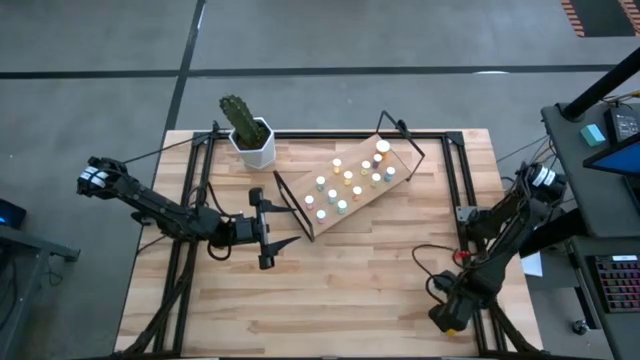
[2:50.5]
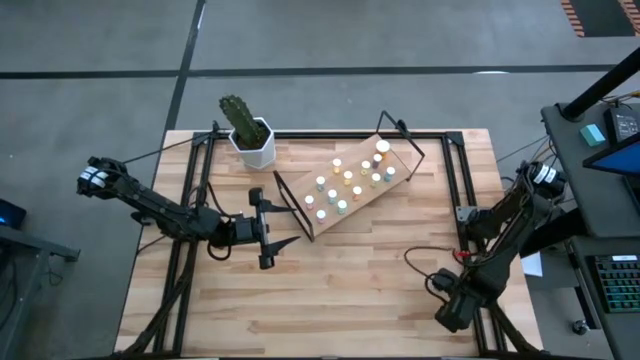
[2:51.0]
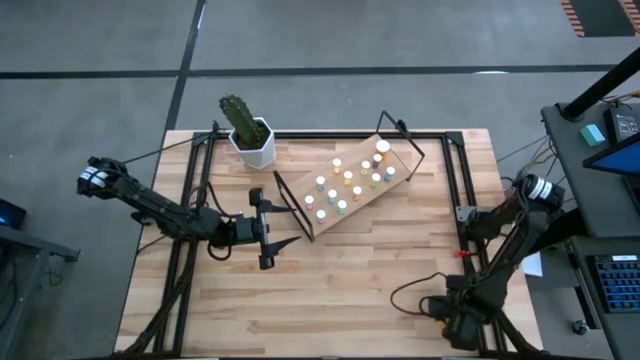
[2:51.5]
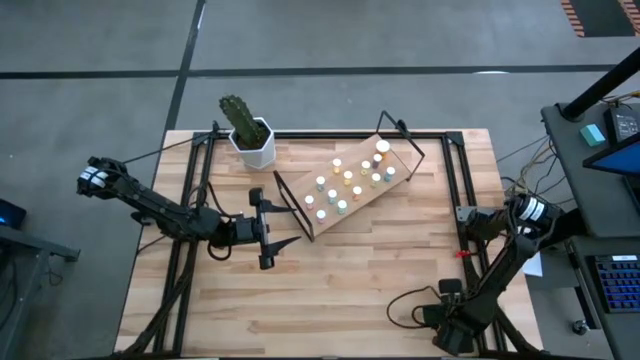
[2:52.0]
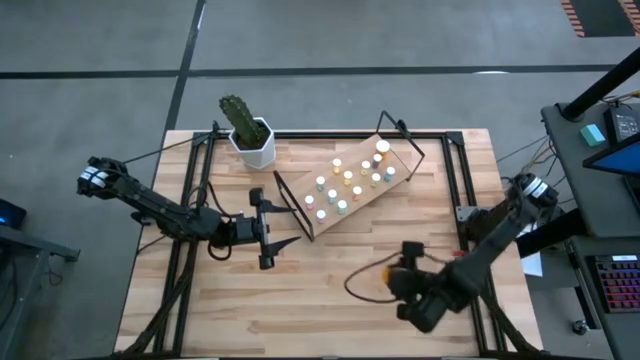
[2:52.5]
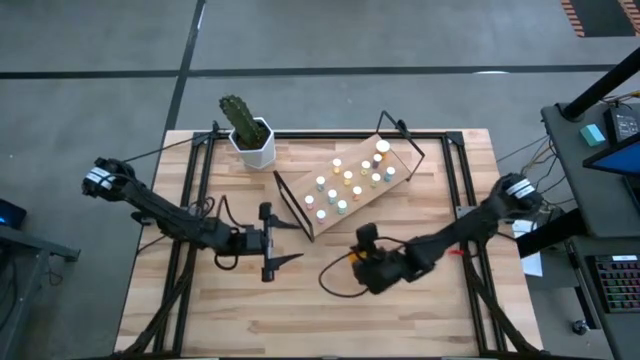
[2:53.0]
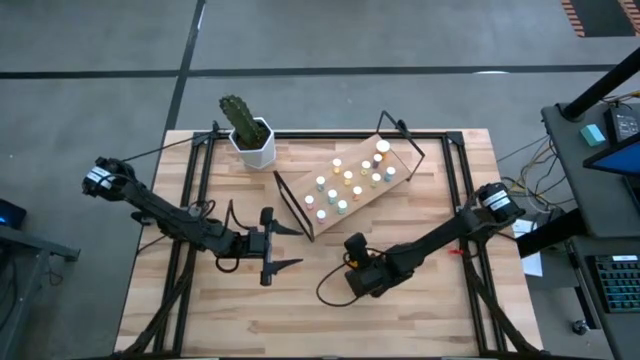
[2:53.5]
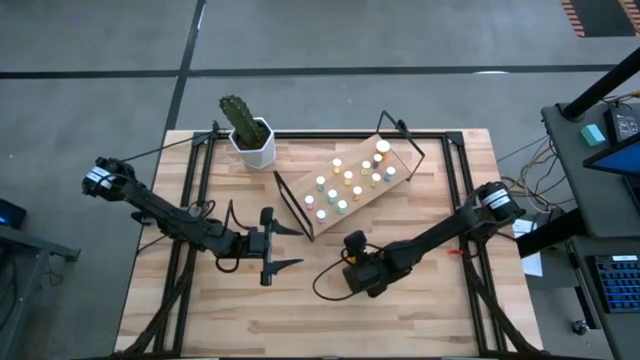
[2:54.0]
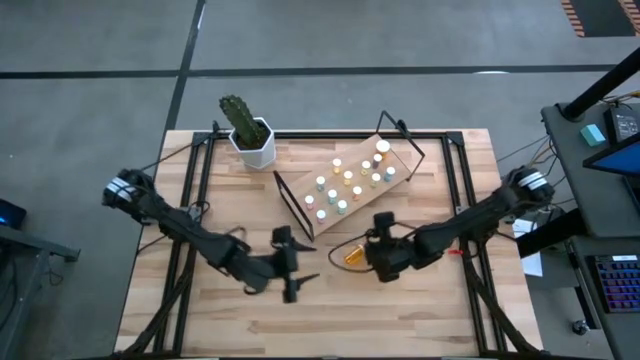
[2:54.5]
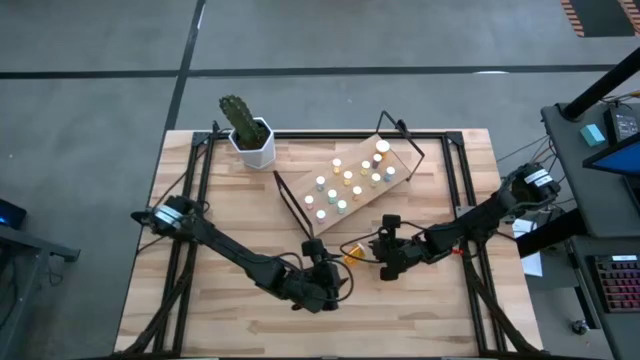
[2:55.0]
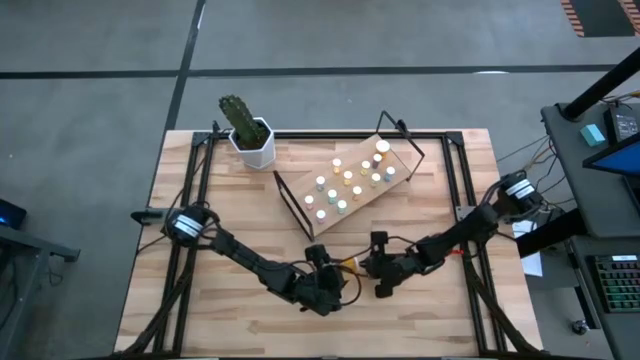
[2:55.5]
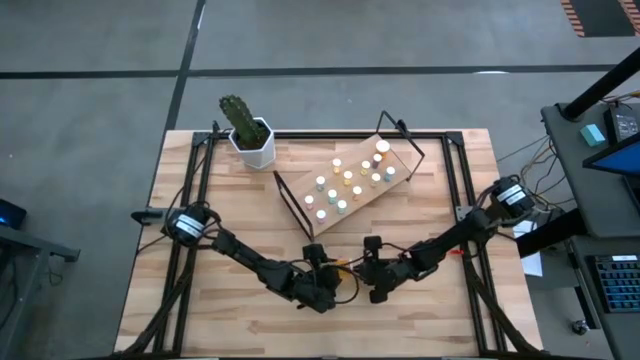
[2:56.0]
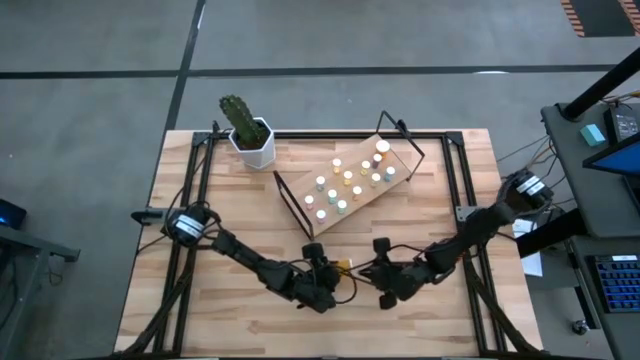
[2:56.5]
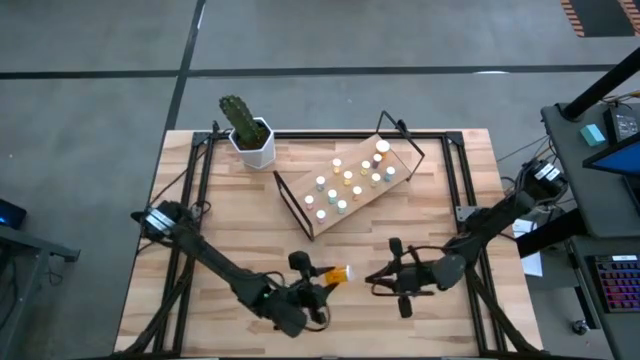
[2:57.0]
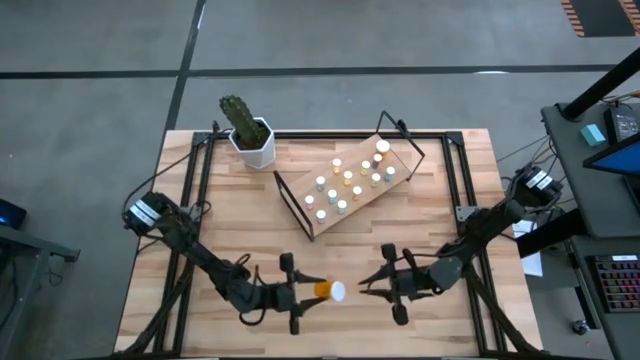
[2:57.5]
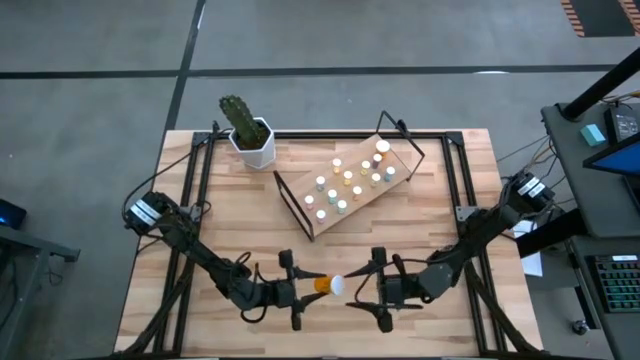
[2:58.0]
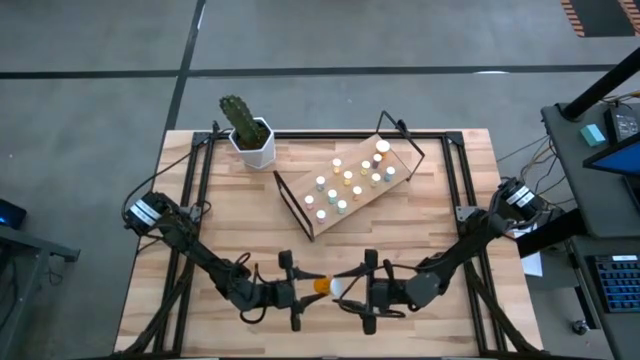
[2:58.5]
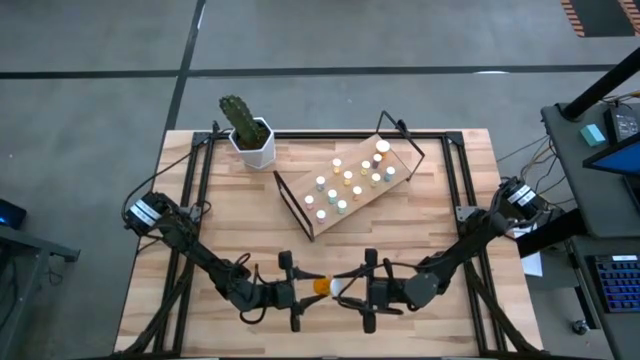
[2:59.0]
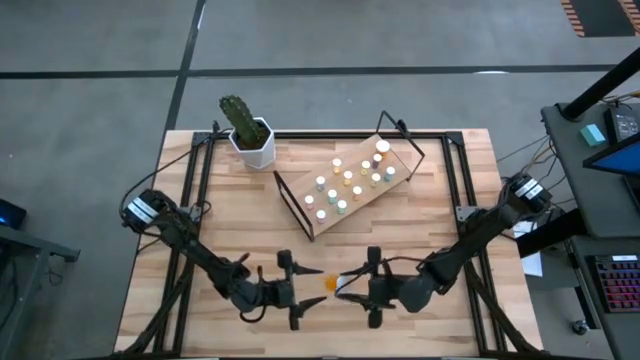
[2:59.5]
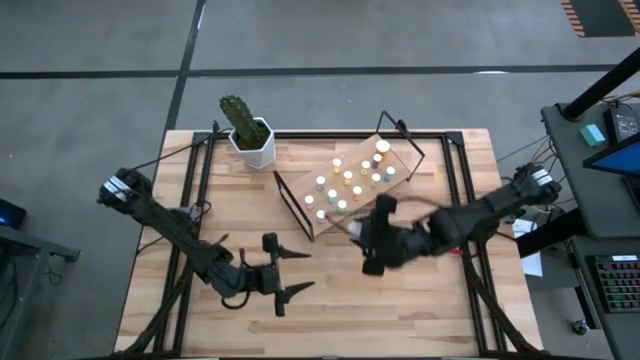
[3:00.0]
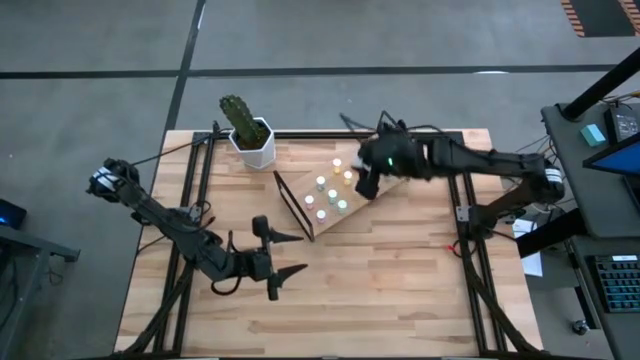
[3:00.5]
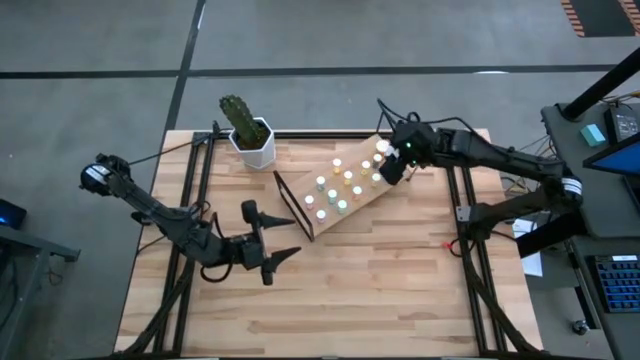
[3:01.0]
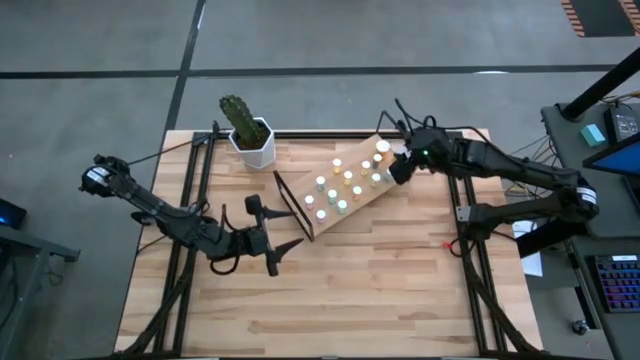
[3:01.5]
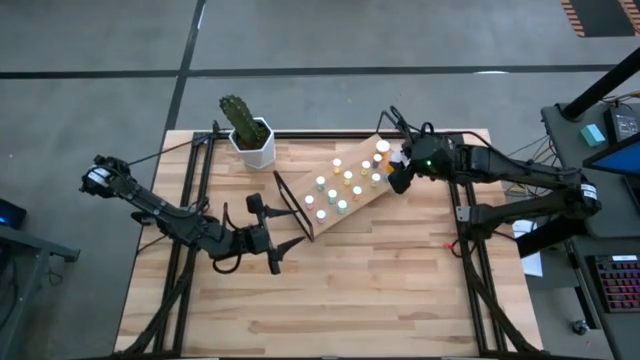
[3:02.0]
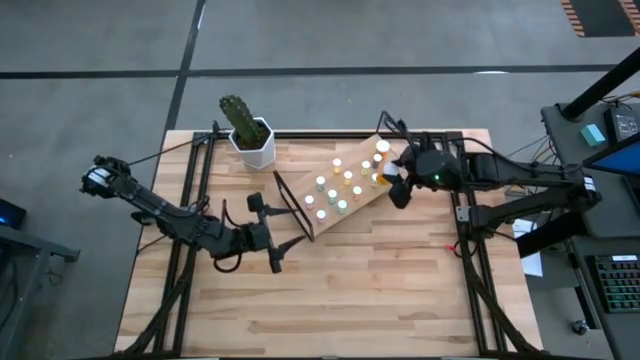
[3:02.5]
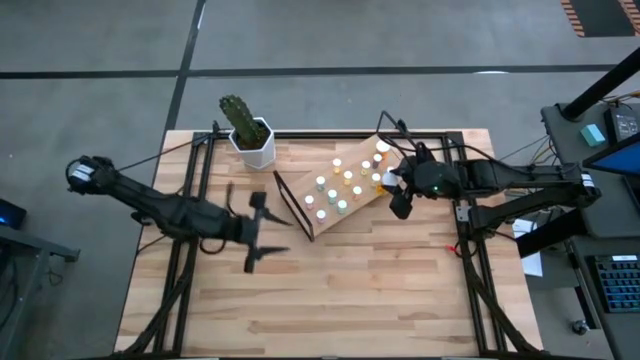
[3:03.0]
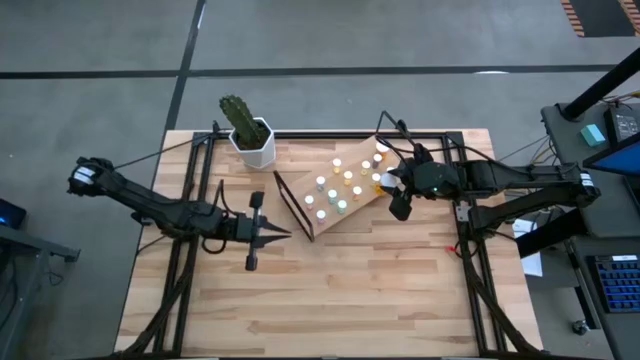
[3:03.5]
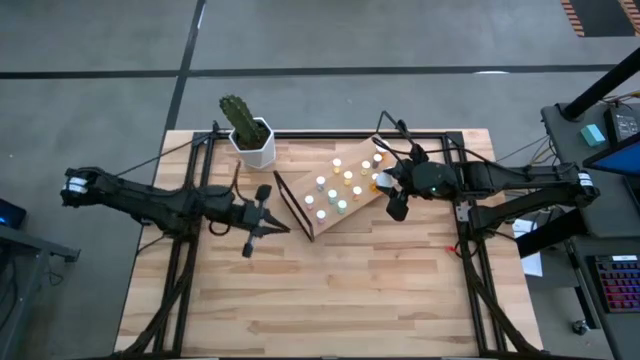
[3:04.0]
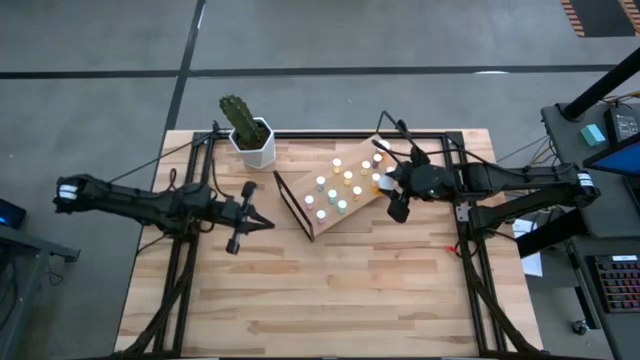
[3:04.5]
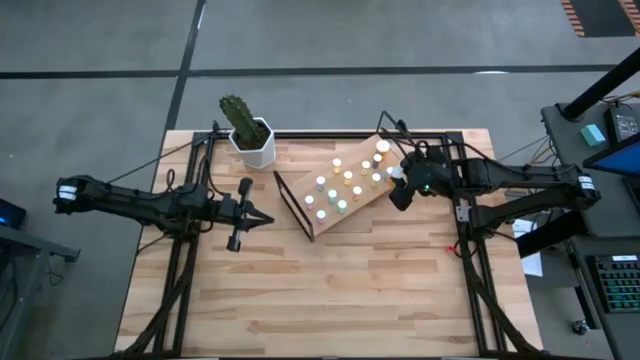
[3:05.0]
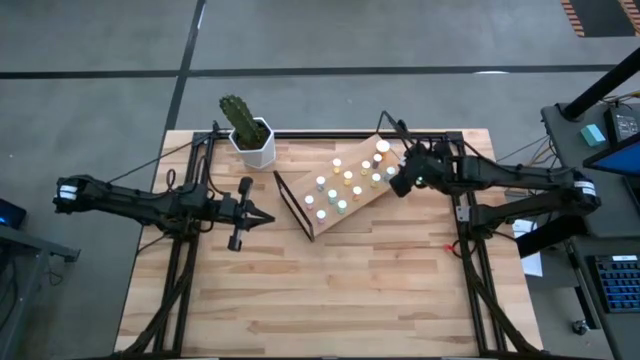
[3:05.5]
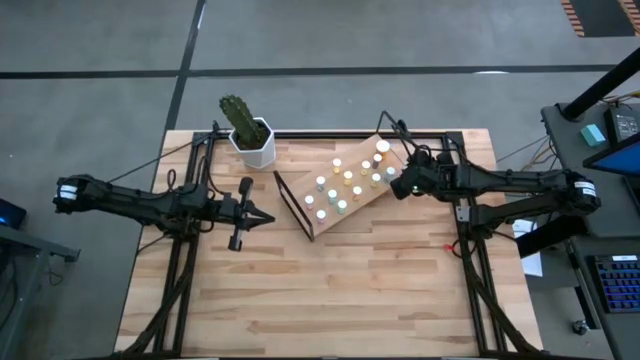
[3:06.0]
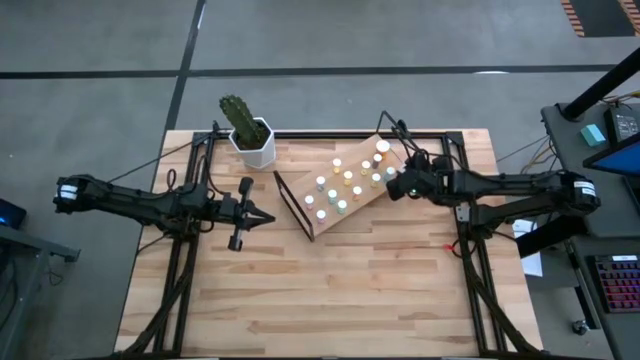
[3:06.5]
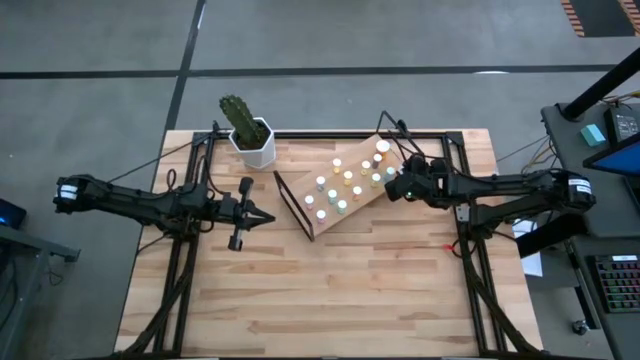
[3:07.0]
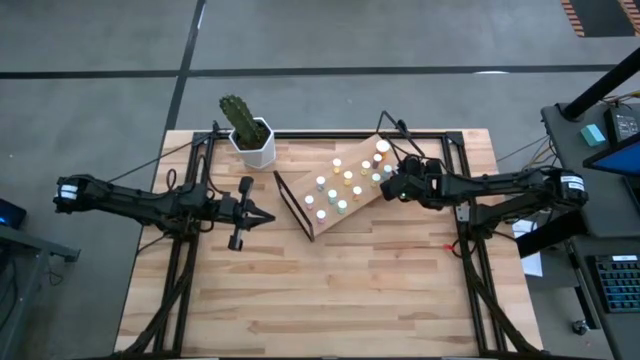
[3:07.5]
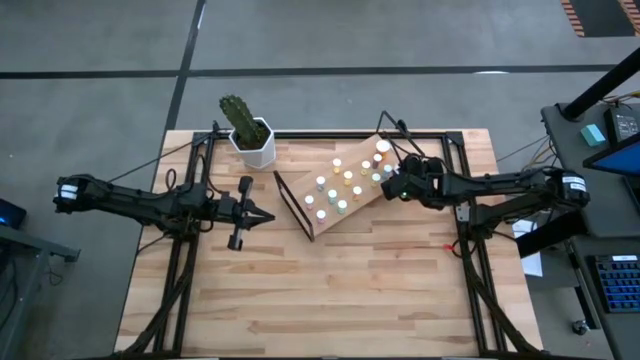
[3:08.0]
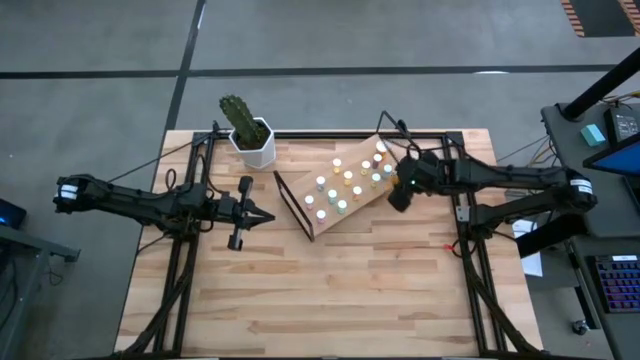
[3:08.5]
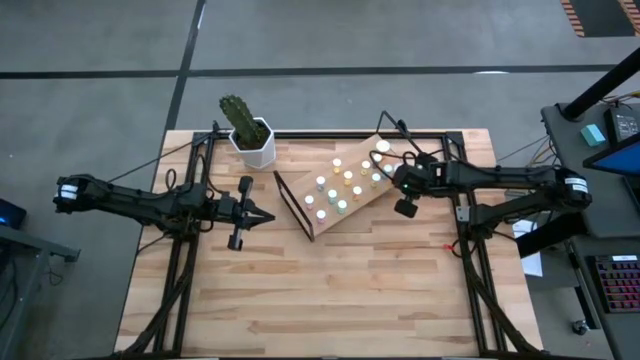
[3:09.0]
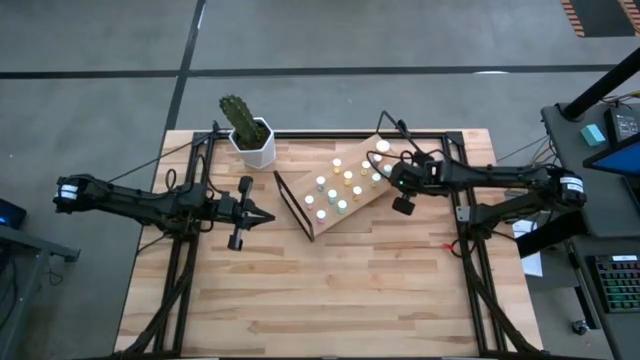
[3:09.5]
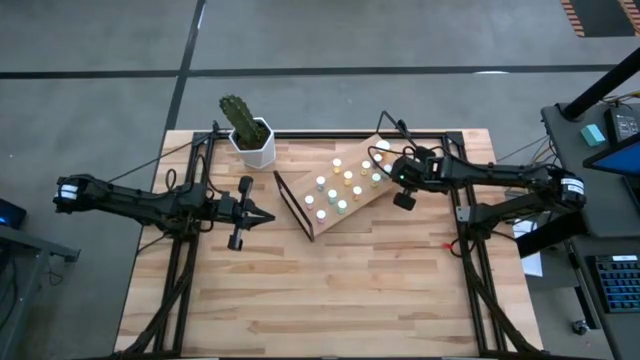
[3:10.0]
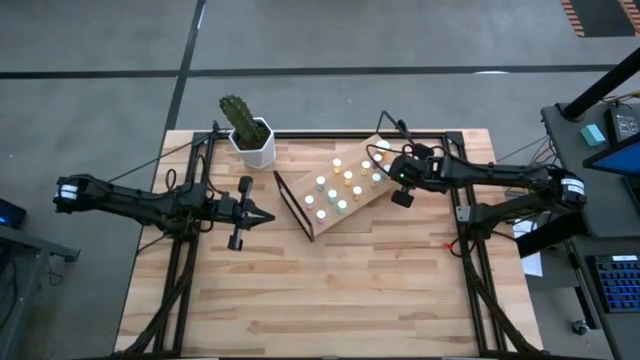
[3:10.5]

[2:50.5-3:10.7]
Task: Pick and place medicine bottles onto shelf by color
Put the orange pill bottle on the shelf aligned with the other orange pill bottle

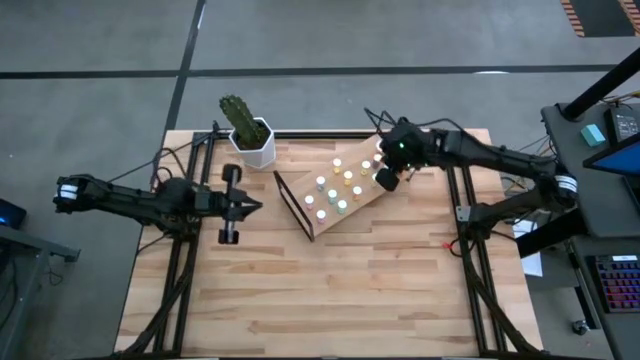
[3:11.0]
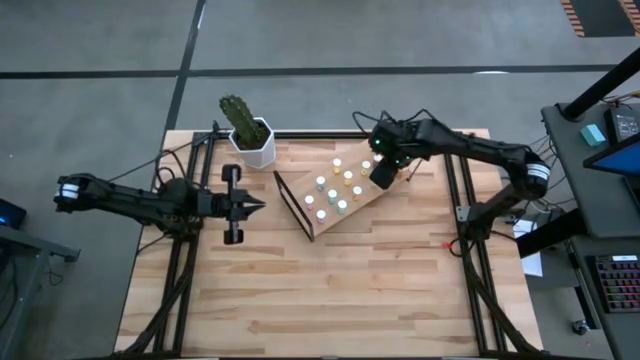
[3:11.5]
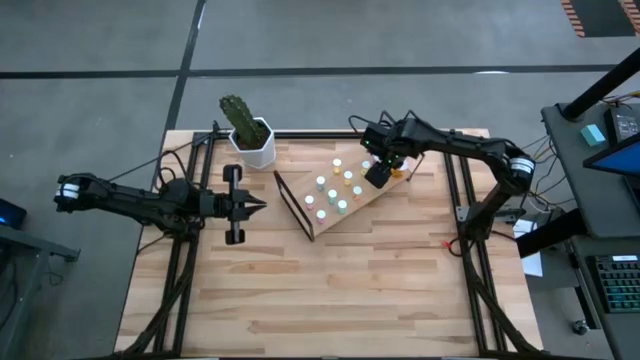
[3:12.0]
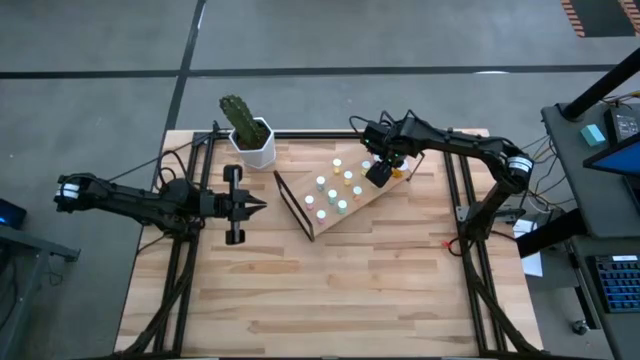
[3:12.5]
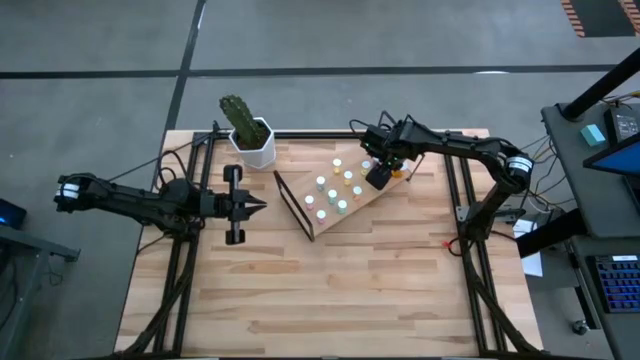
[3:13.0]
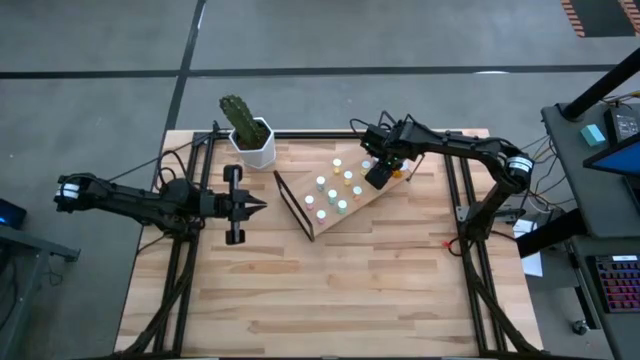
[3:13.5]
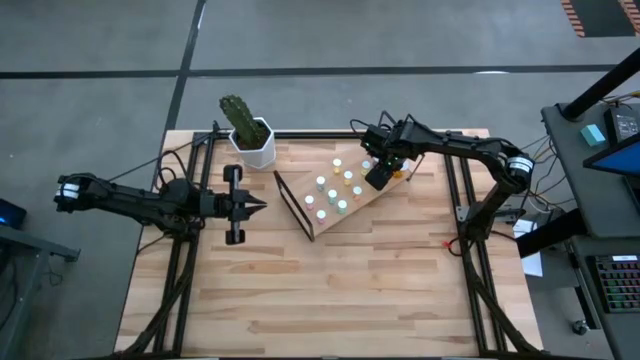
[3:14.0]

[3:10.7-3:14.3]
Adjust the blue pill bottle on the shelf
